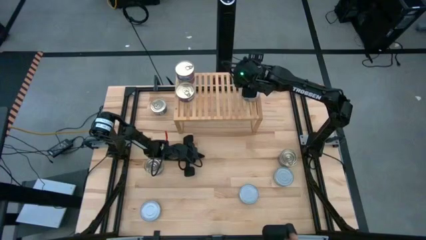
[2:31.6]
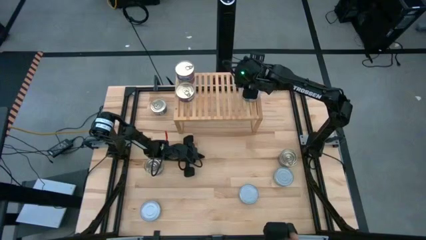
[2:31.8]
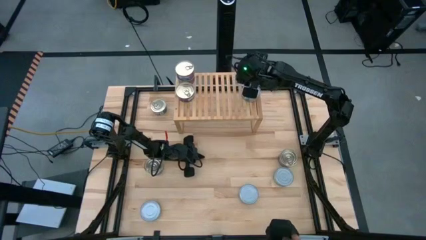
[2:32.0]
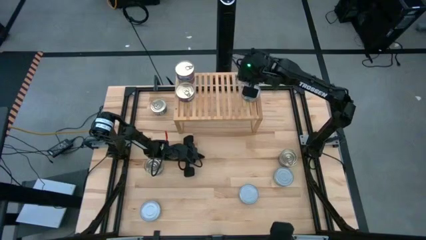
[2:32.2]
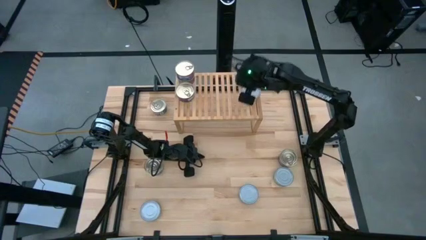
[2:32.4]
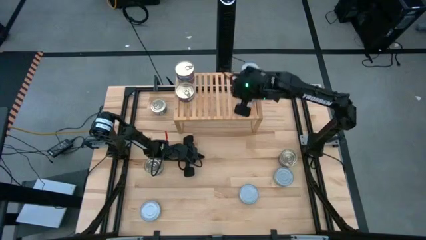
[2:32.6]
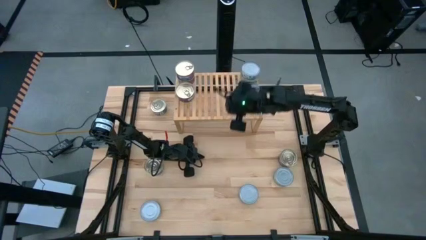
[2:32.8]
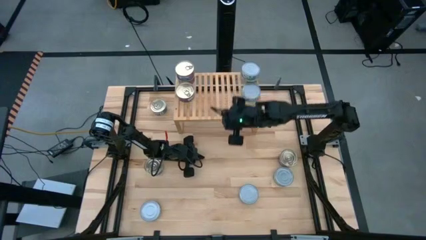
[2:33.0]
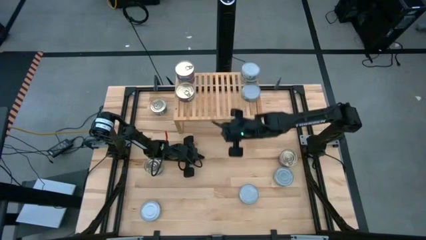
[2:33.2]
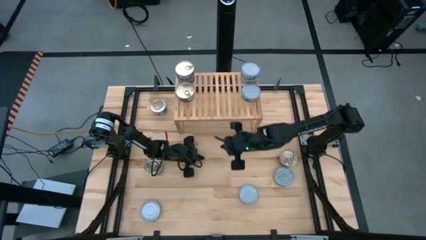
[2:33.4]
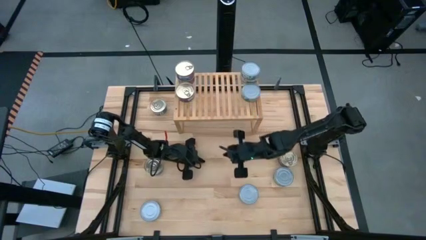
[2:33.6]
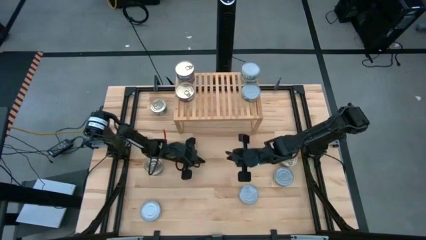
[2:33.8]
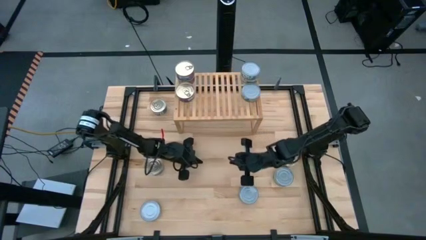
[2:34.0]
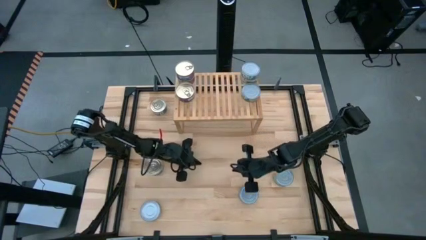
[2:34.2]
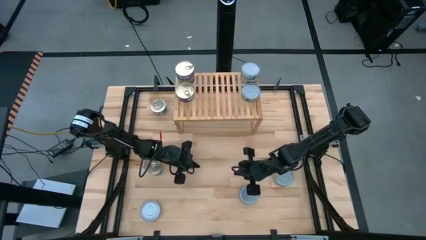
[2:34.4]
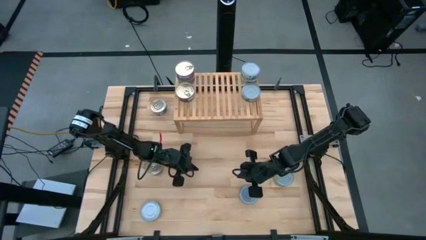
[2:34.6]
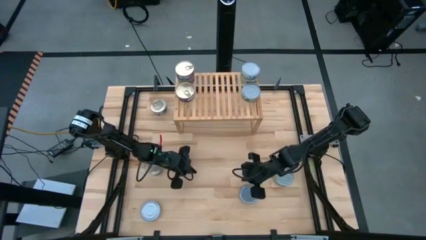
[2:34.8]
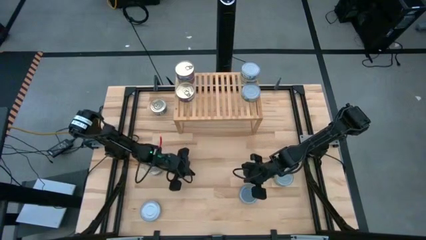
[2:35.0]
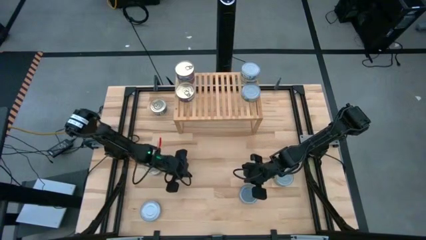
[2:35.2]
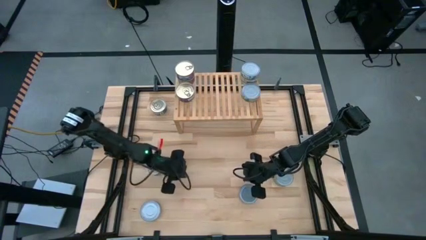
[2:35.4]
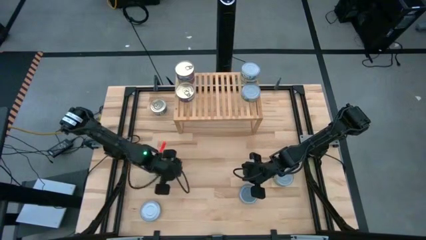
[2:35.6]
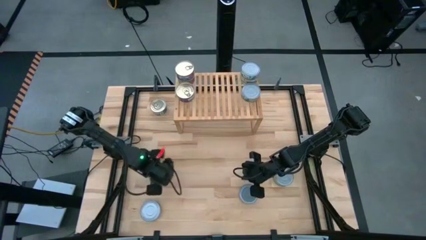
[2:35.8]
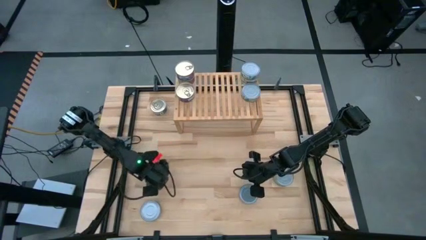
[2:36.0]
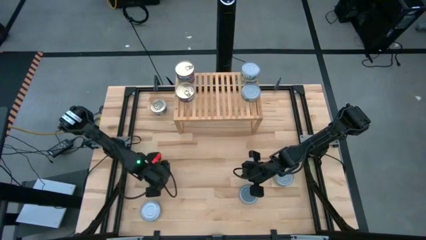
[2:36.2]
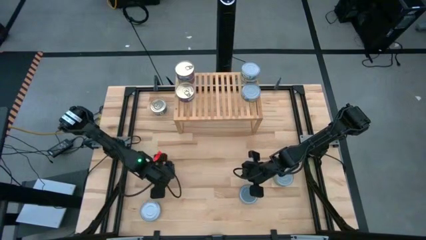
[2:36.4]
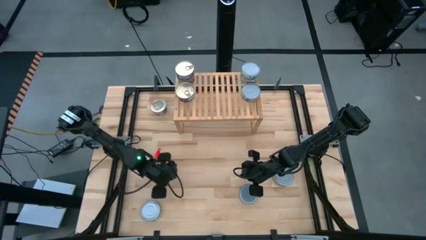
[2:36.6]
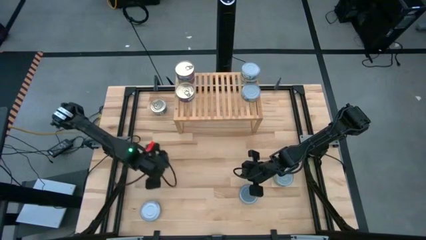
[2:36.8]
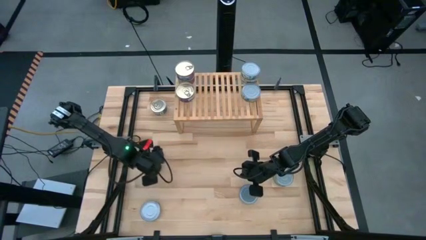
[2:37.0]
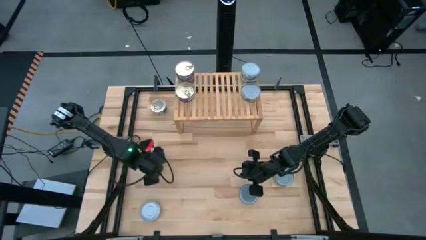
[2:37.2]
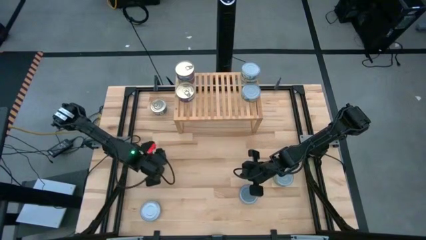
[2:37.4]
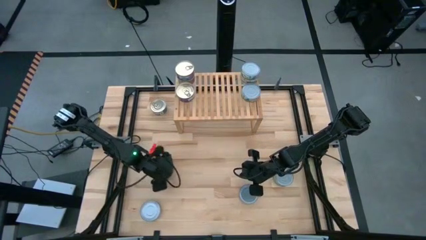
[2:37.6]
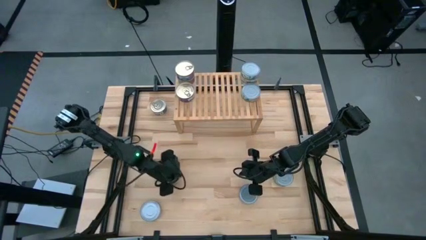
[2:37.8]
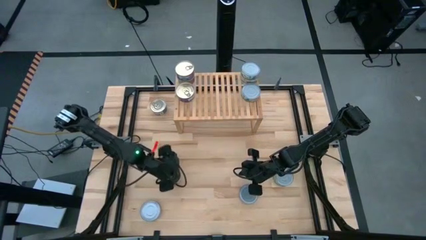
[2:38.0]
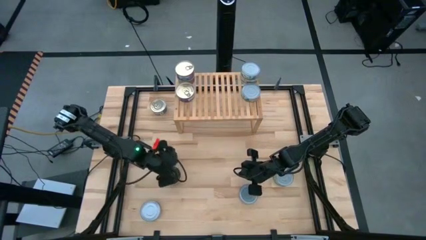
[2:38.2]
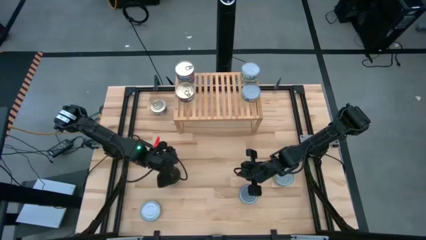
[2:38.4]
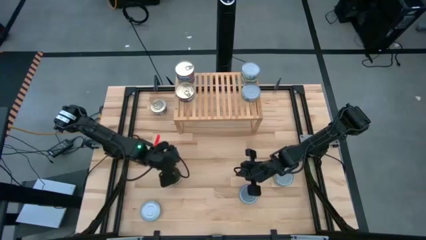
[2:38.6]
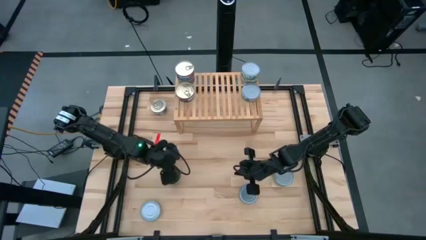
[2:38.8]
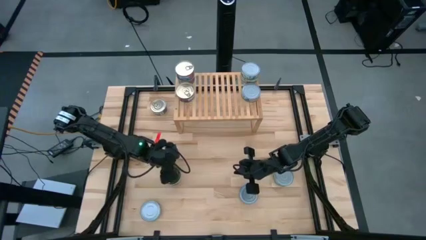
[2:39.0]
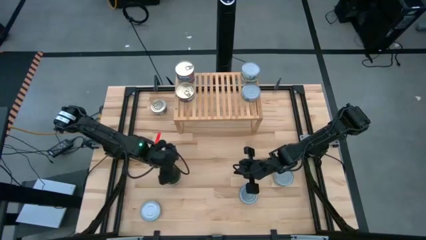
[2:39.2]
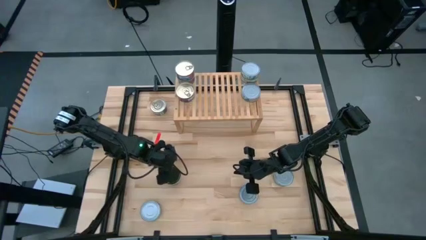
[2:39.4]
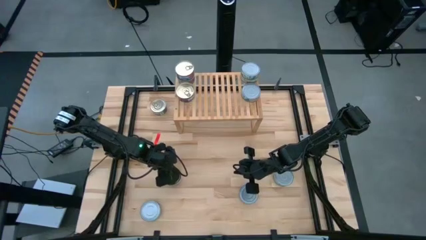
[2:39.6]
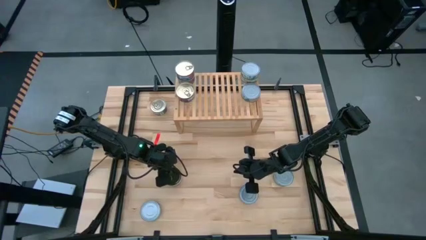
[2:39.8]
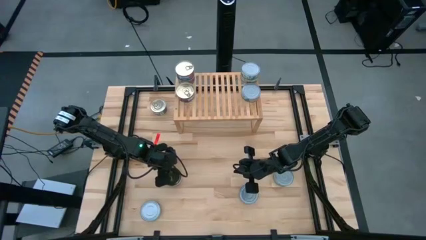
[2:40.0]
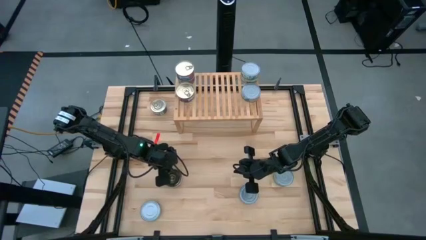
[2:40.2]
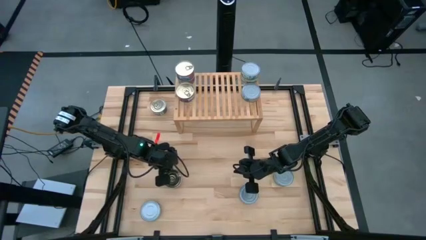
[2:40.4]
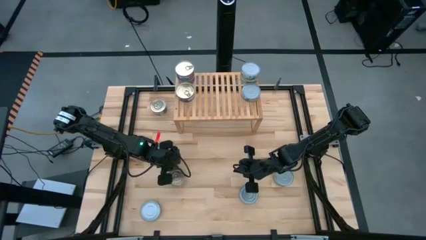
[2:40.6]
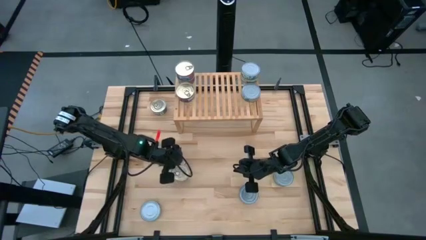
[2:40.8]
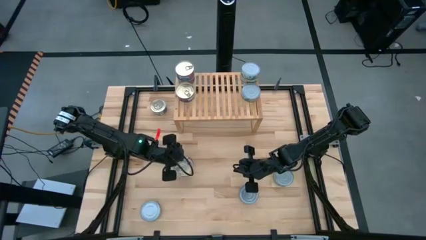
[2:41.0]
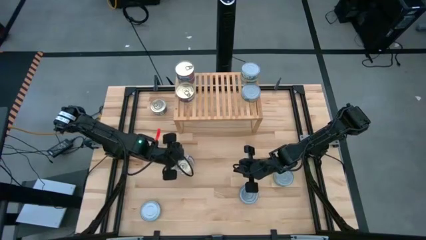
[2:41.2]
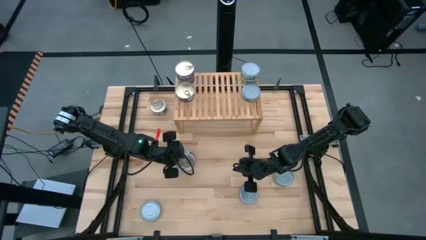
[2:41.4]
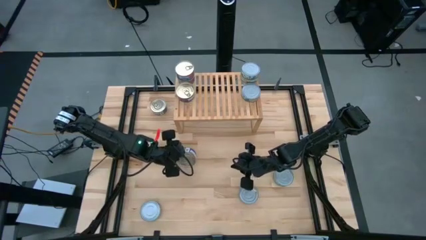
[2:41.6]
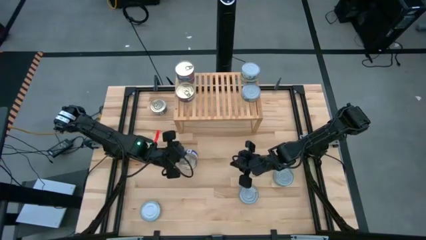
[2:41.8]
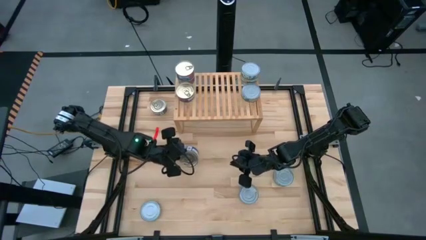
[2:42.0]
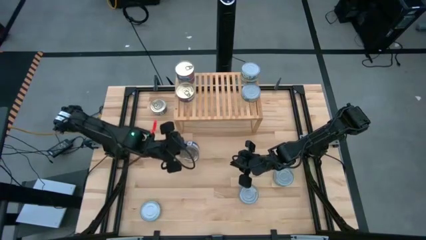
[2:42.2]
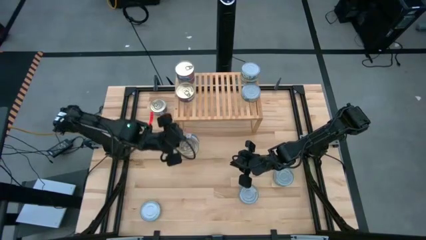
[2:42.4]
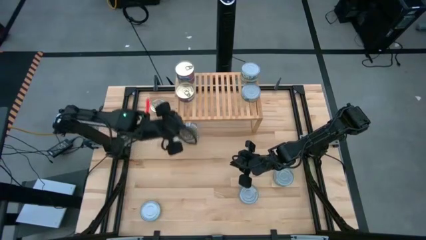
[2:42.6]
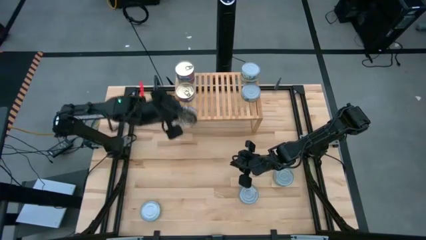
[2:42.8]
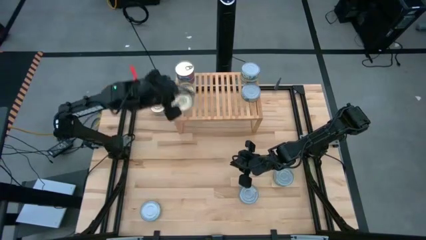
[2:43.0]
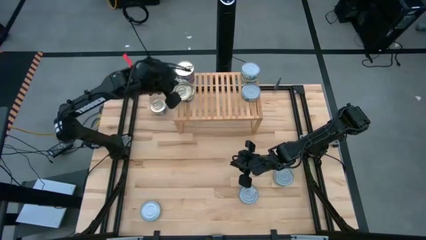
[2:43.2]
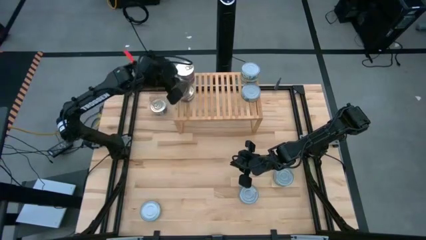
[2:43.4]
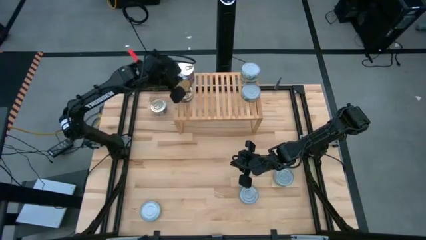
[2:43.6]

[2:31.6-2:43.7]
Task: Stack canned seafood by type on shelf
Stack the blue-pink tuna can on top of the other blue tuna can on the shelf

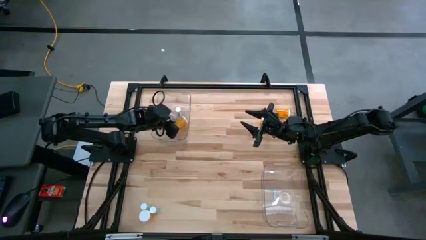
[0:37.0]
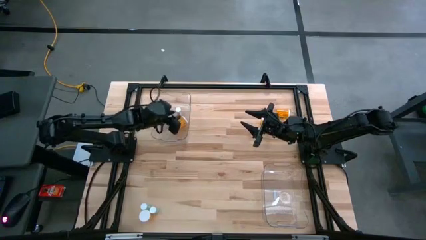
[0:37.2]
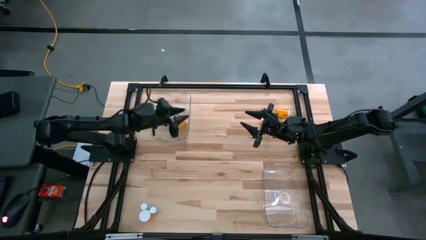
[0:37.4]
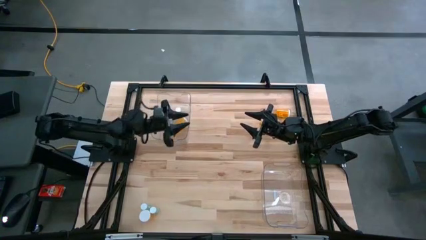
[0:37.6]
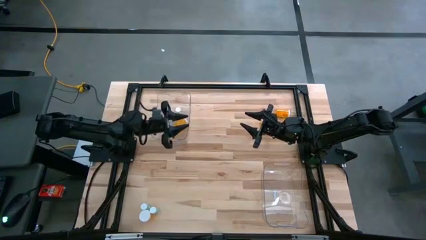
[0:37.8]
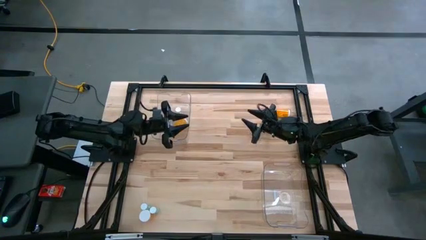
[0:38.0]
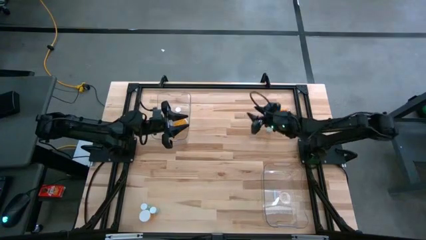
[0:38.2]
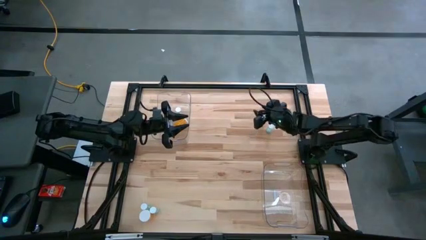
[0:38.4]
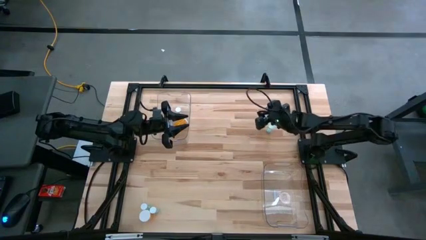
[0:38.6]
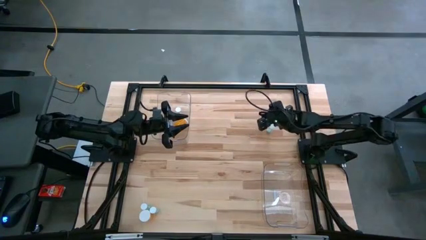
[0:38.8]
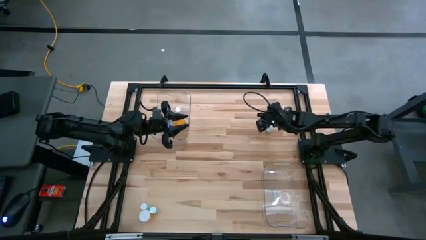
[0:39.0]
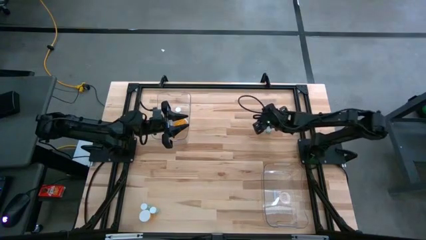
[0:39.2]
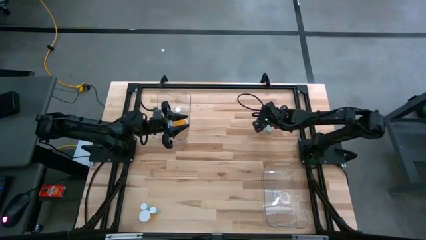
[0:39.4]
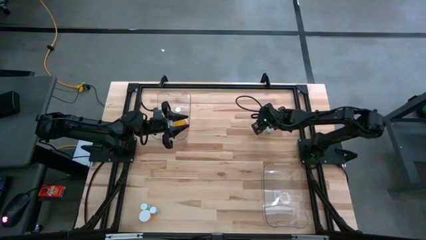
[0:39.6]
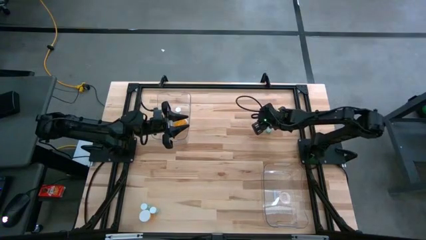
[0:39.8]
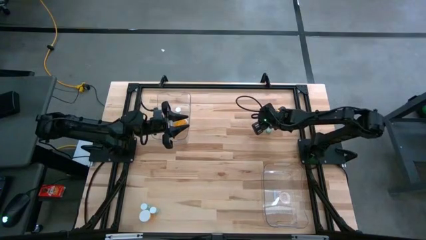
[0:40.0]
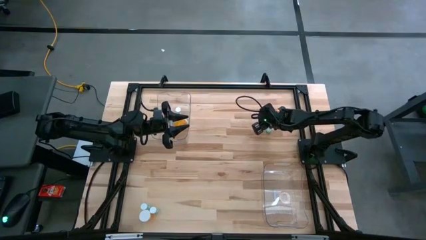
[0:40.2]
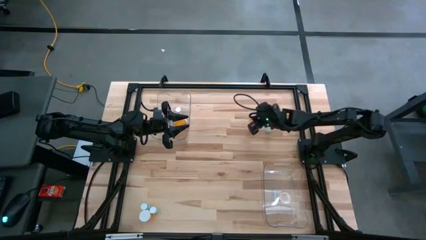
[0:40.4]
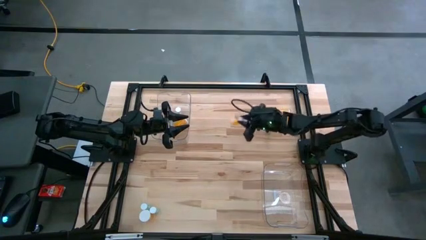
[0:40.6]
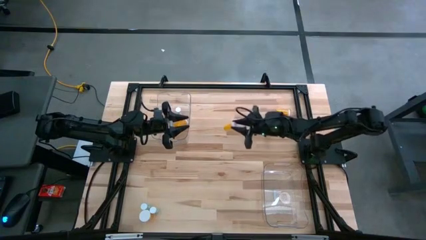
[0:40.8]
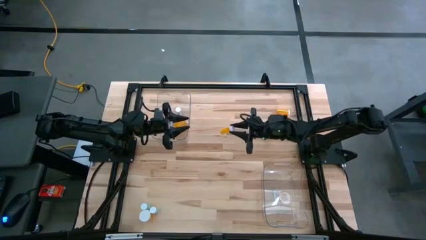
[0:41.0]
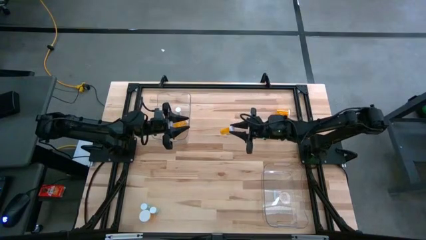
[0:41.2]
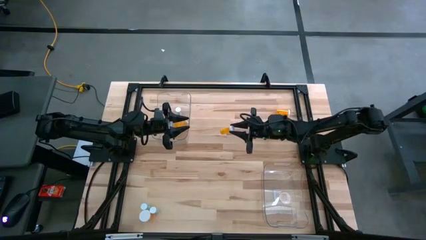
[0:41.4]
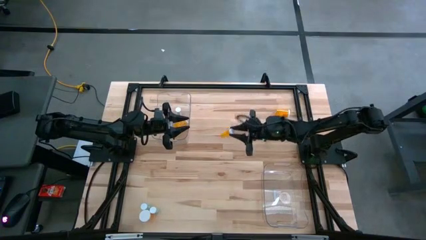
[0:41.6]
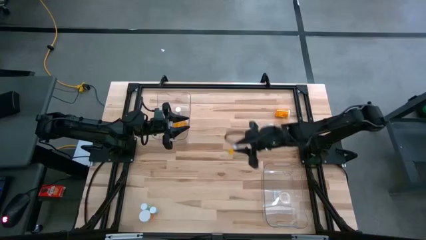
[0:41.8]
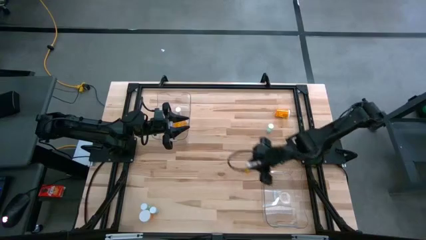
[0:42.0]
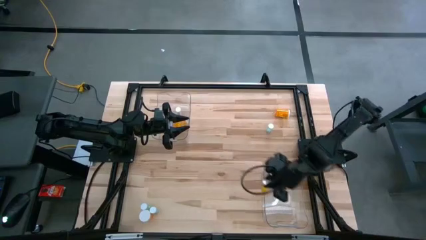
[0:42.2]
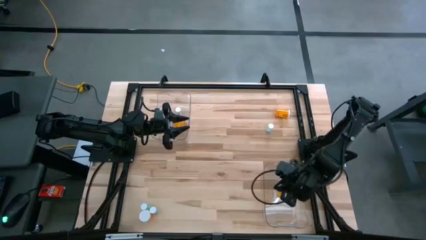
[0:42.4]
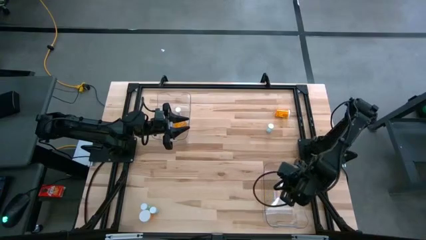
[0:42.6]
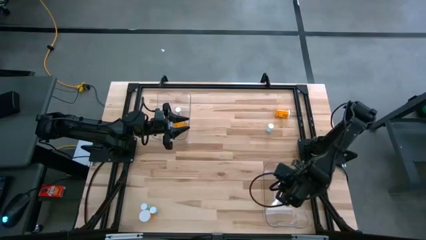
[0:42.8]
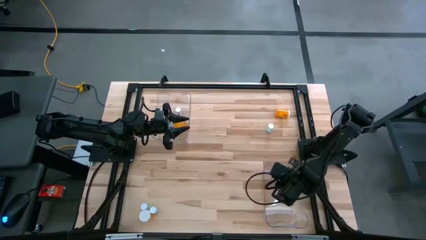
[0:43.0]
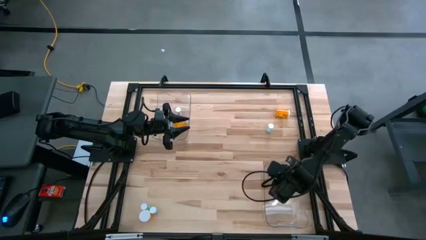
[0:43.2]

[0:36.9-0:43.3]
Task: Pick and place medicine bottles into bin by pill shape (circle, oval)
Put the orange tablet bottle into the right transparent bin
